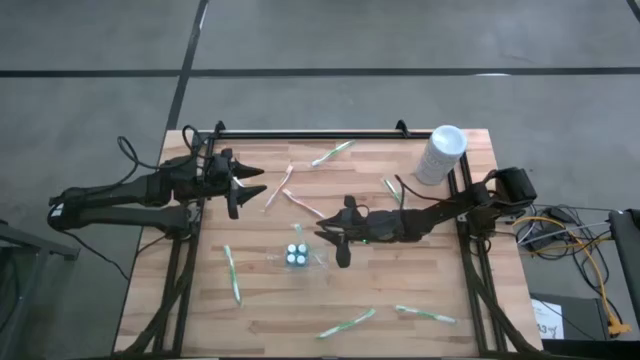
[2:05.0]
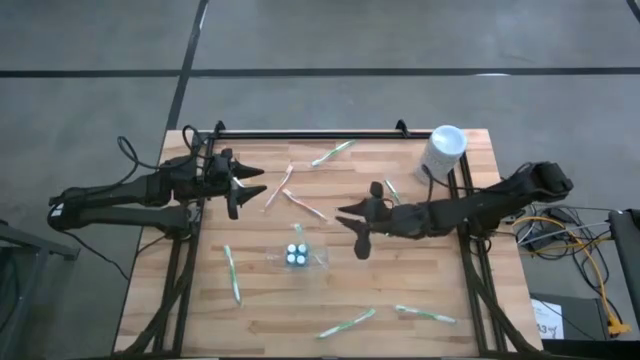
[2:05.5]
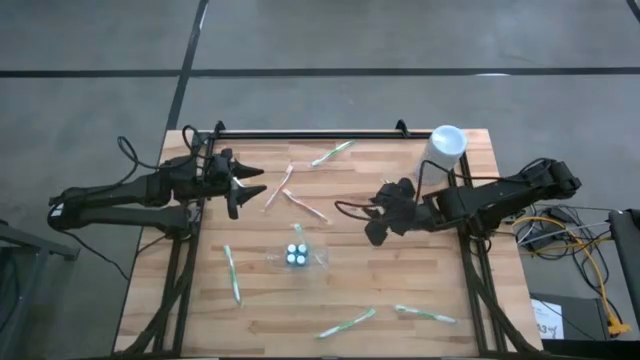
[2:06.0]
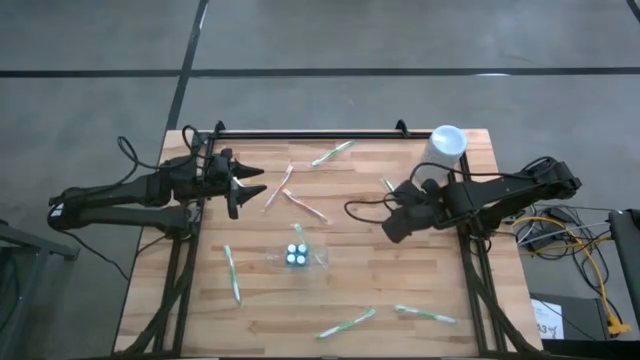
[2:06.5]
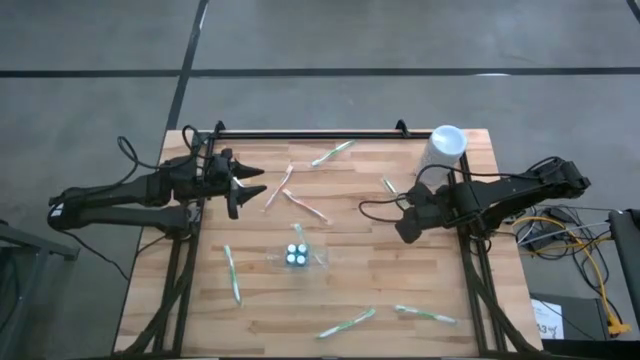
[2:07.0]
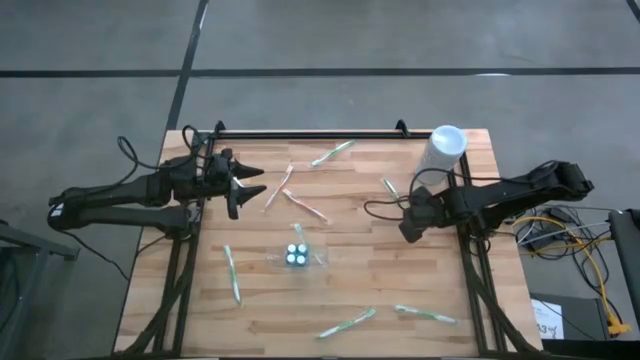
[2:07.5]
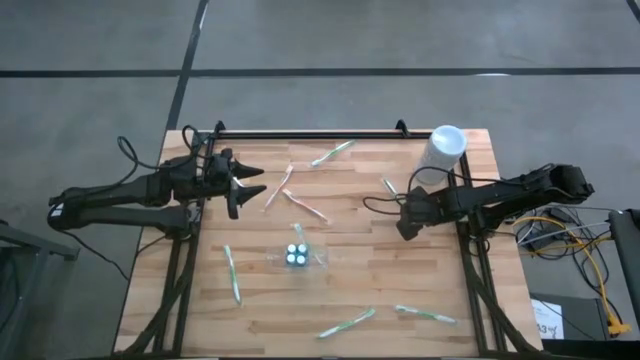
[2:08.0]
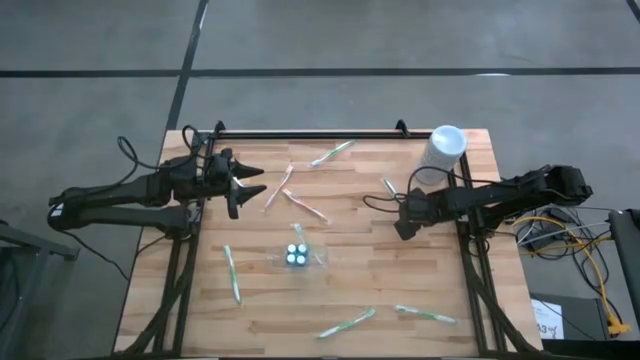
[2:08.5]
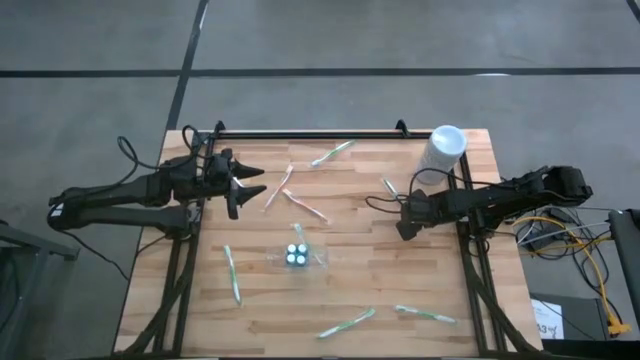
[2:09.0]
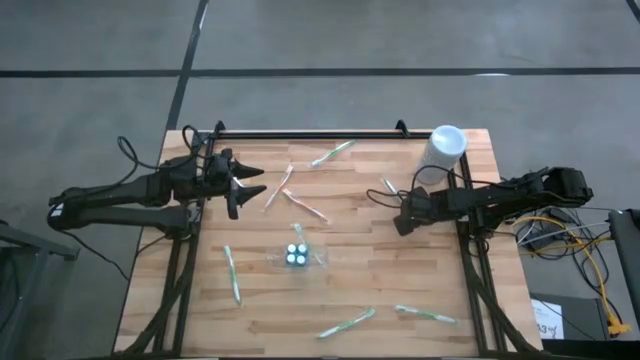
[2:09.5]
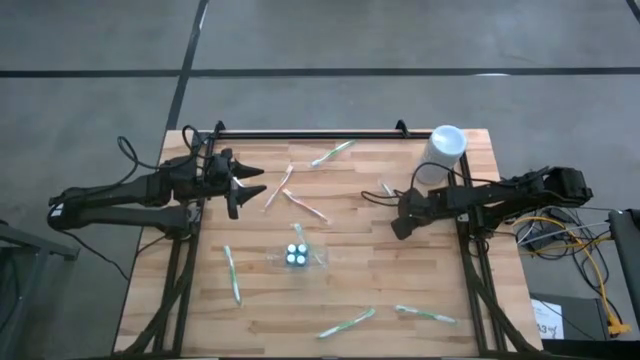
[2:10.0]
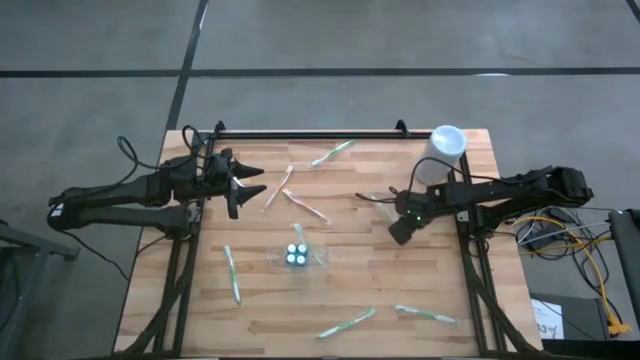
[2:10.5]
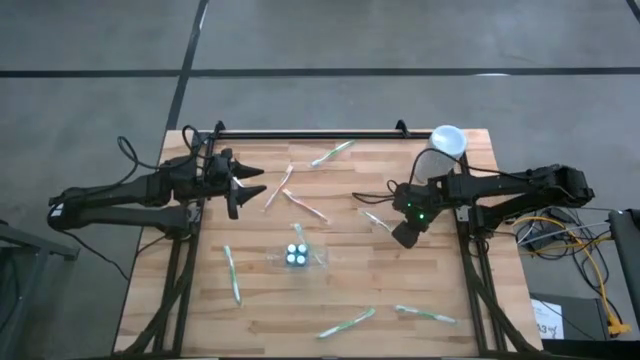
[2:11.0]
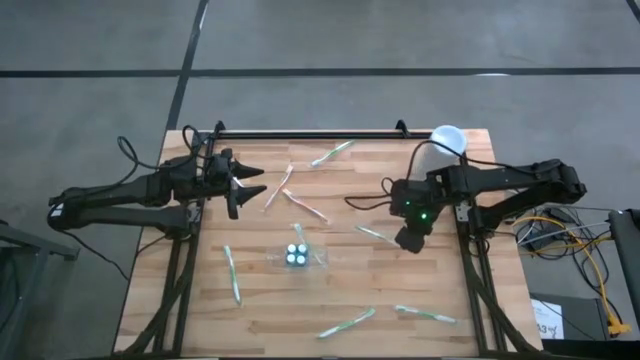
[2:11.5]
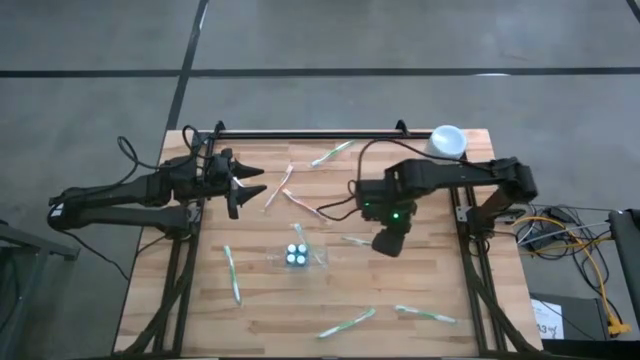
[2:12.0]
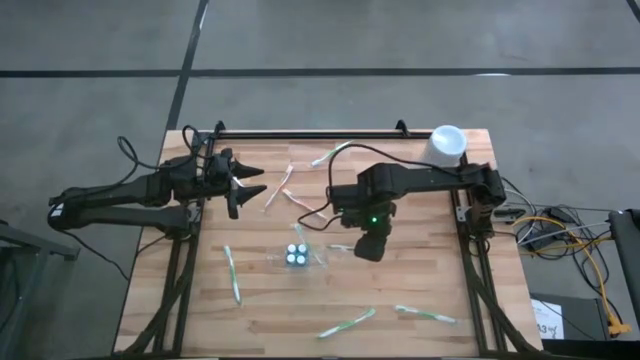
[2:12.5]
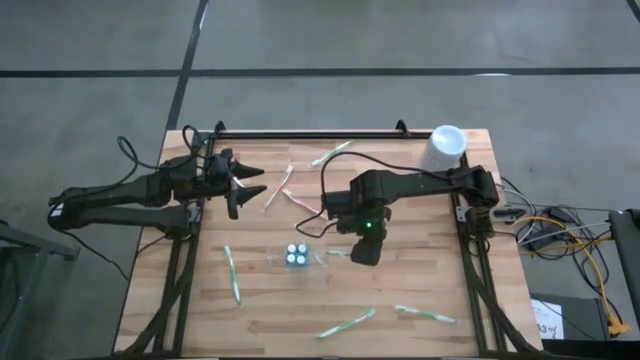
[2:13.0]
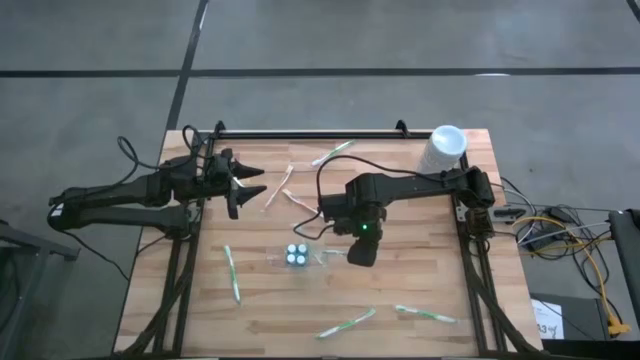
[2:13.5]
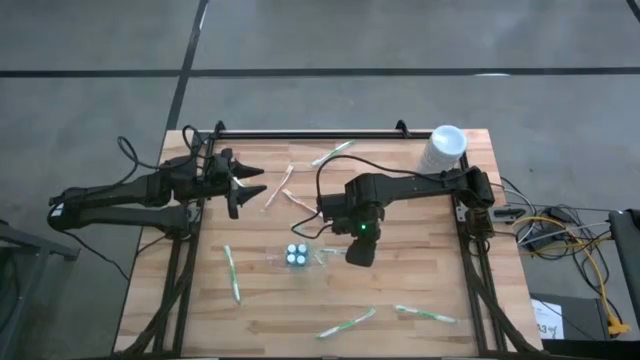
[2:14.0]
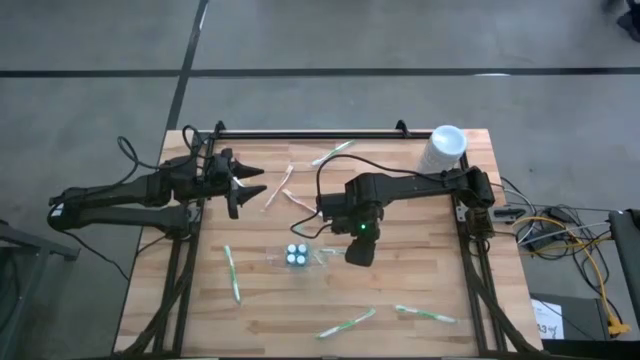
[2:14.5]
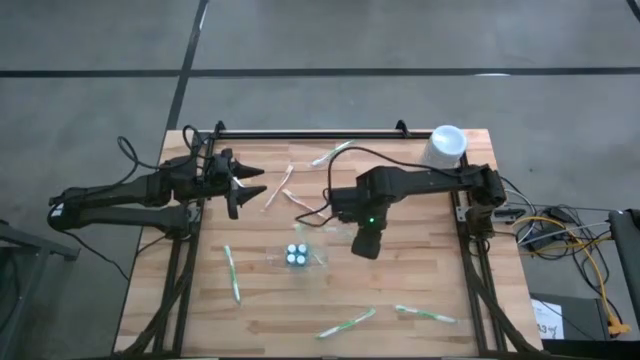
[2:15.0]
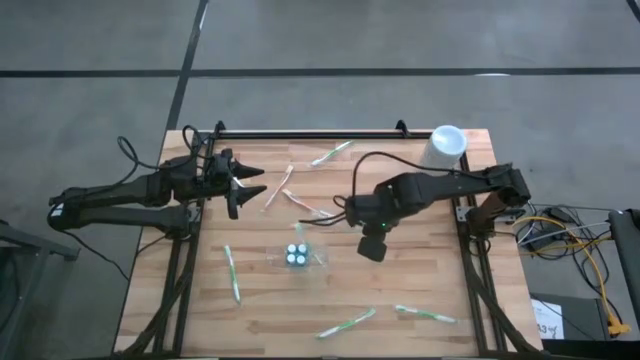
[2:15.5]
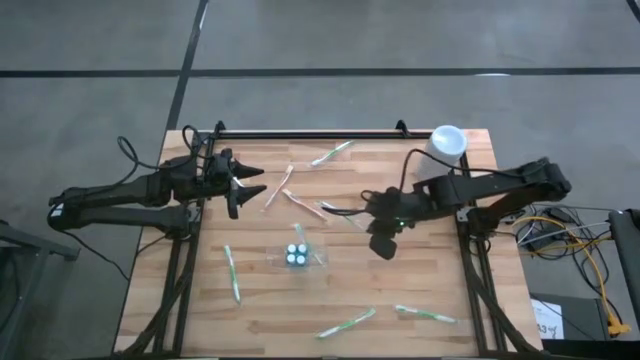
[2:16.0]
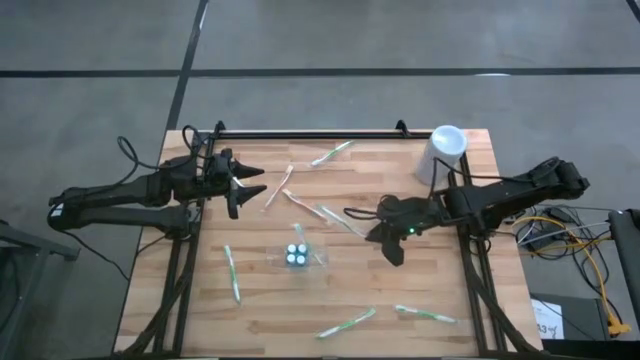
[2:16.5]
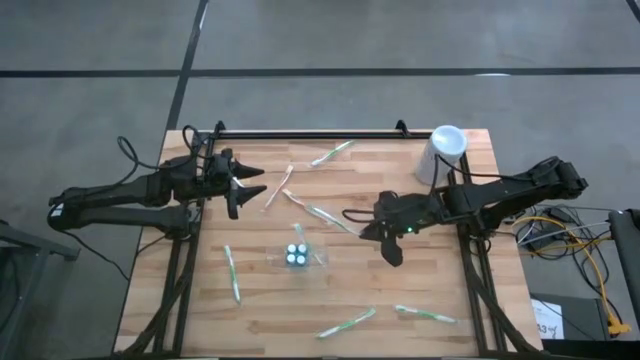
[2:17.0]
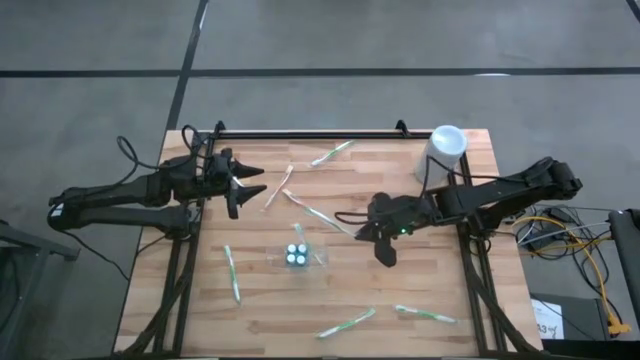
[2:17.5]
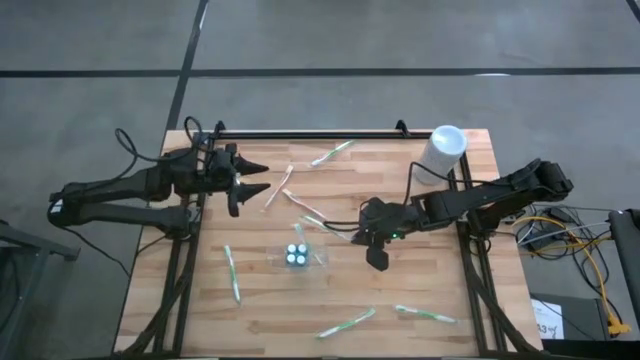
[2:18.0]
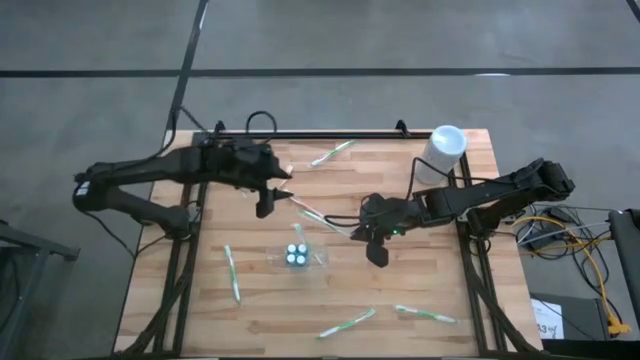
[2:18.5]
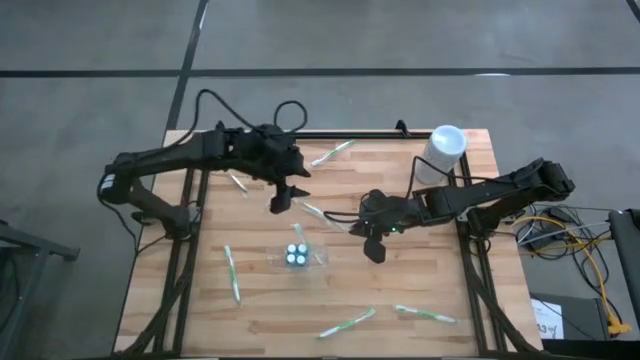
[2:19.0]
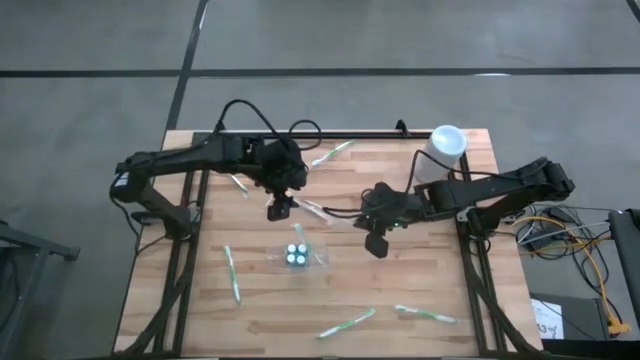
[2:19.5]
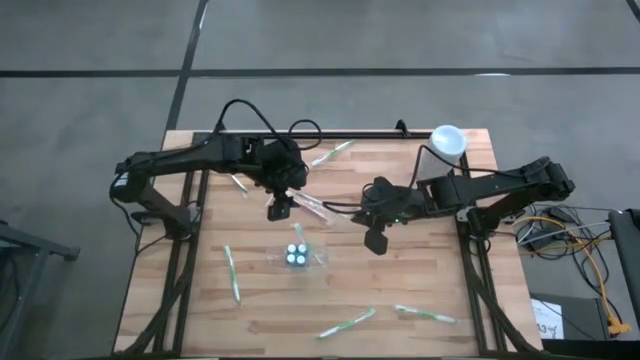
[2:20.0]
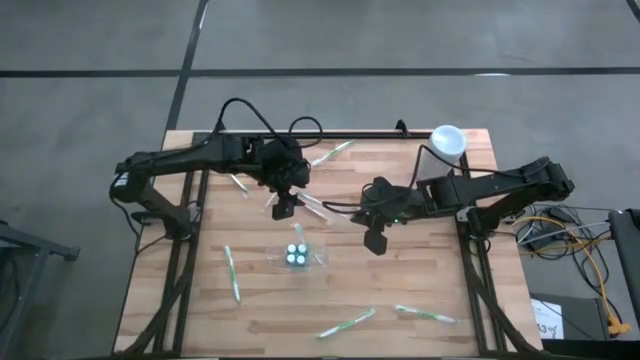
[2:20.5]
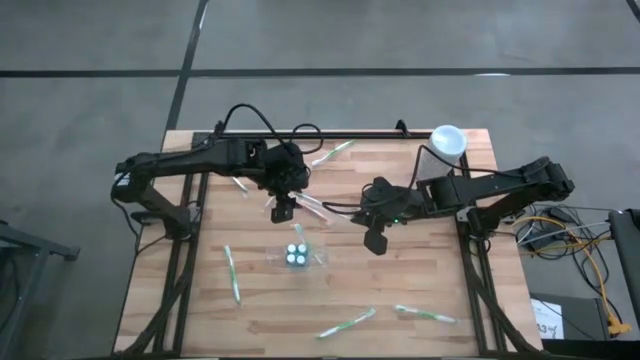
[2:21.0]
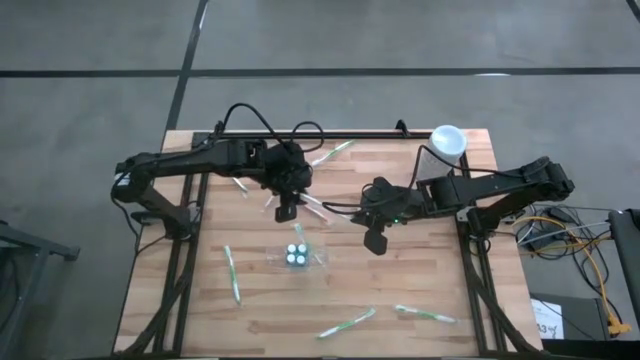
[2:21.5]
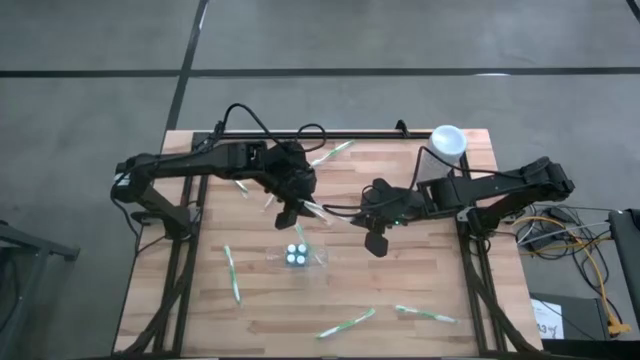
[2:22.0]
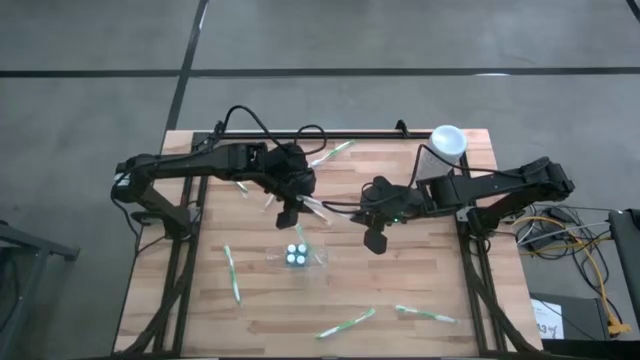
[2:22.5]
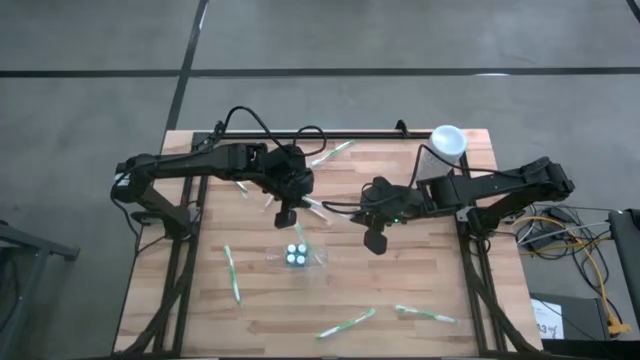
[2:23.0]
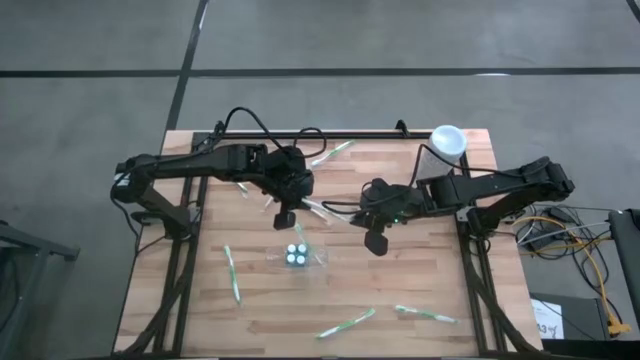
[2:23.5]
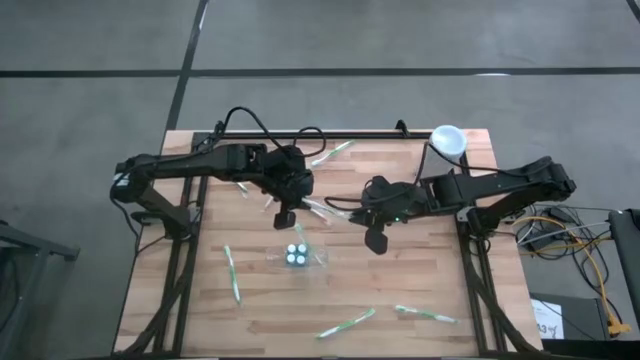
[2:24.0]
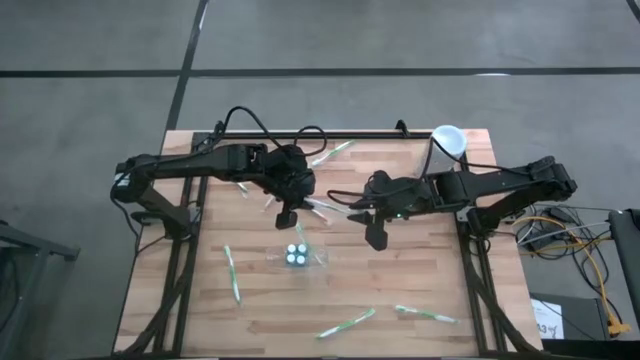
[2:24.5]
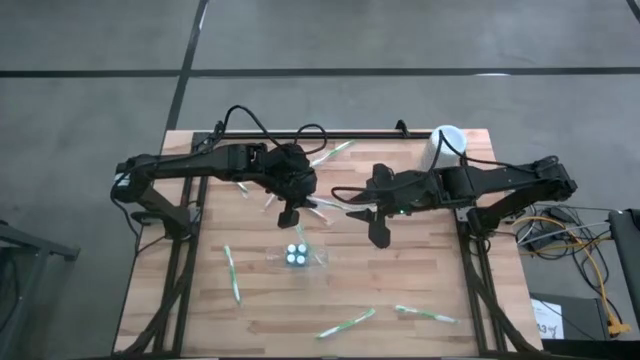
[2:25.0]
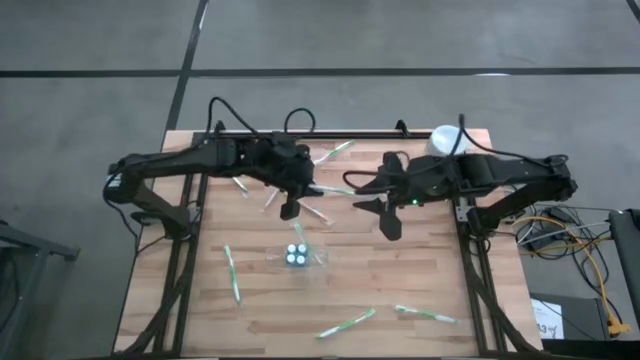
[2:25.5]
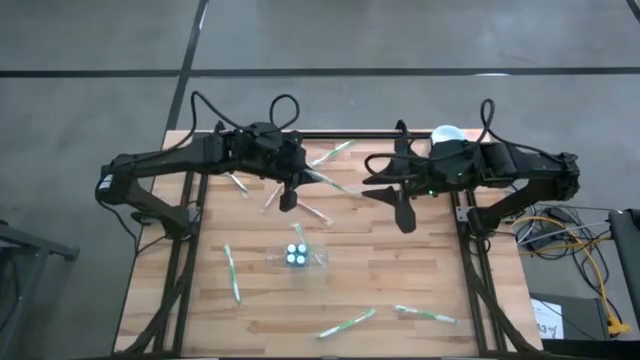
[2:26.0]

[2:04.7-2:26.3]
Task: Pick & Place toothbrushing station
Put the green toothbrush into the transparent organizer
